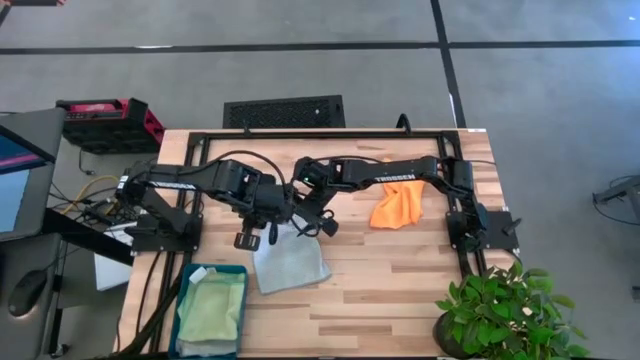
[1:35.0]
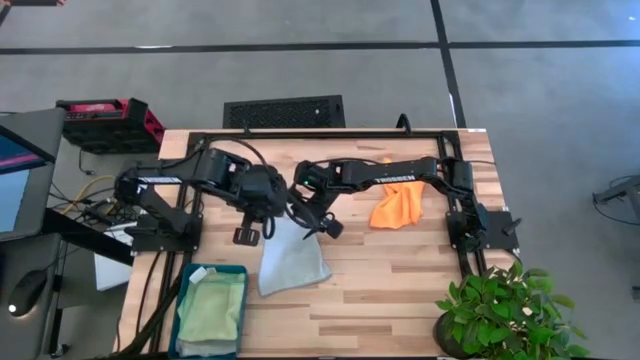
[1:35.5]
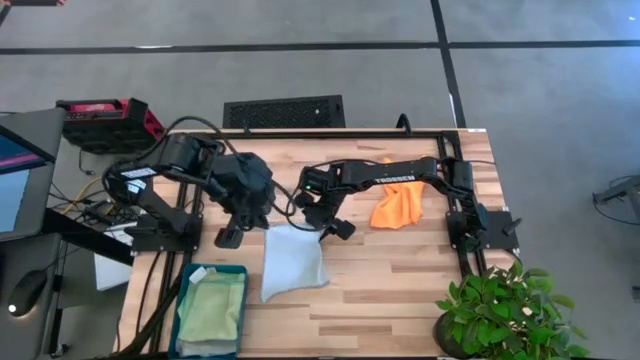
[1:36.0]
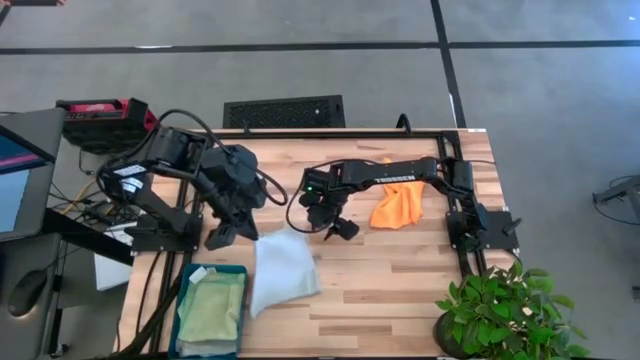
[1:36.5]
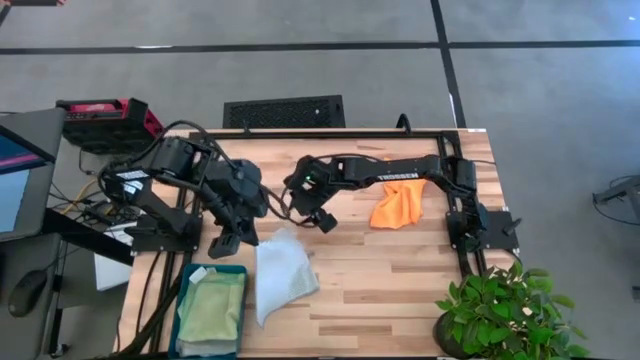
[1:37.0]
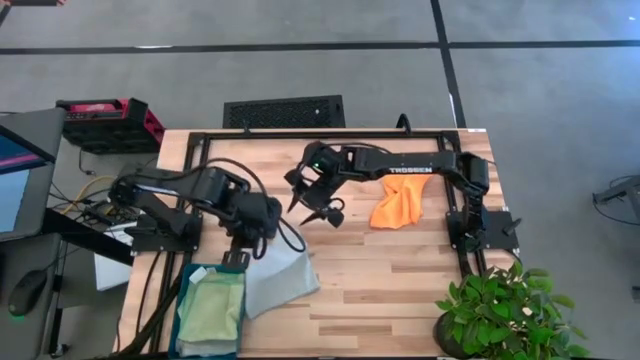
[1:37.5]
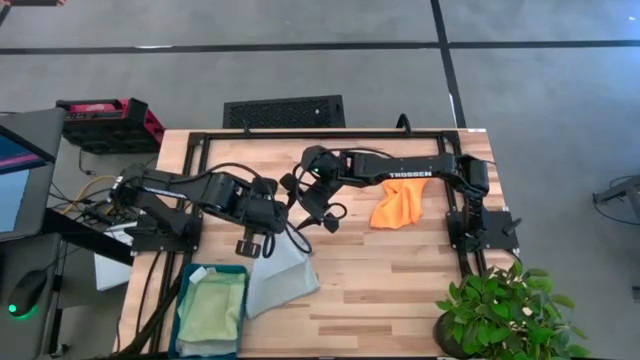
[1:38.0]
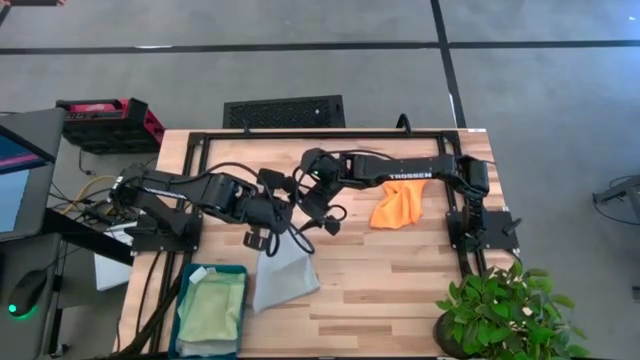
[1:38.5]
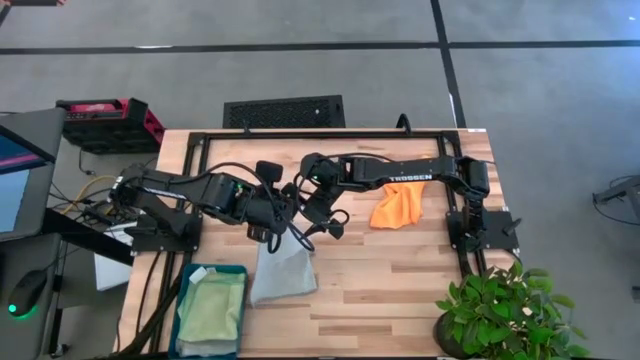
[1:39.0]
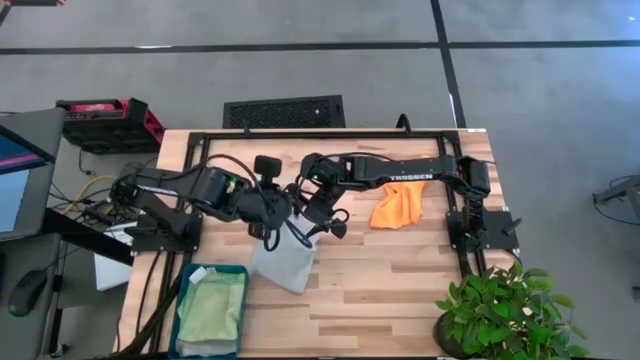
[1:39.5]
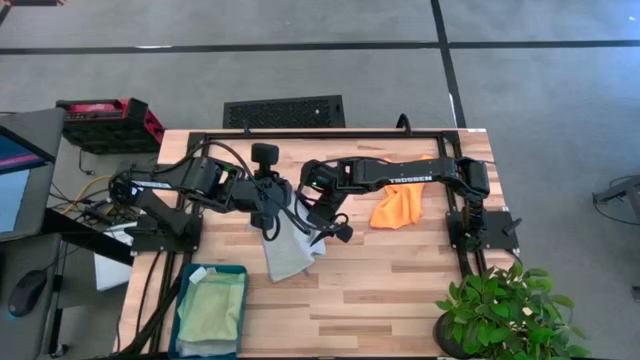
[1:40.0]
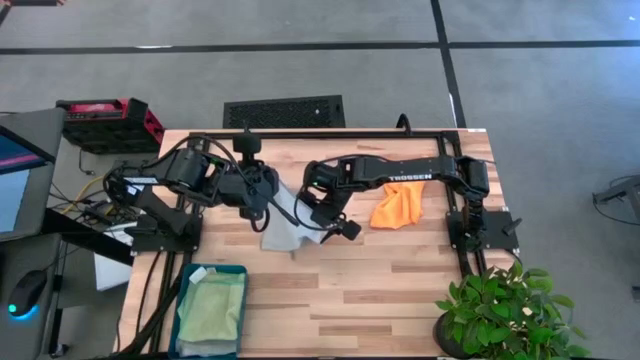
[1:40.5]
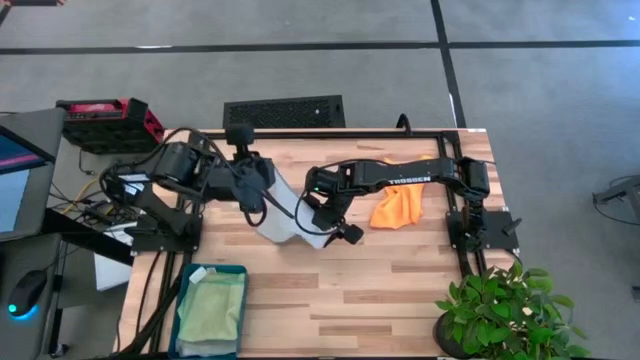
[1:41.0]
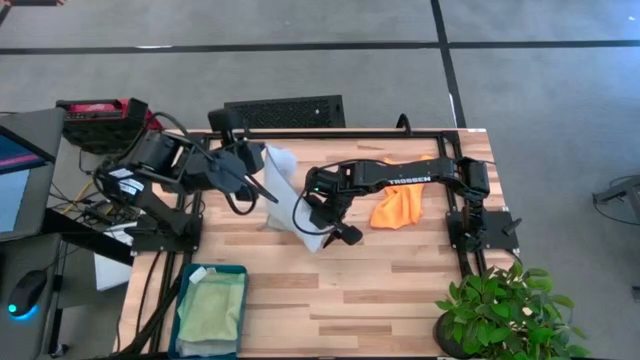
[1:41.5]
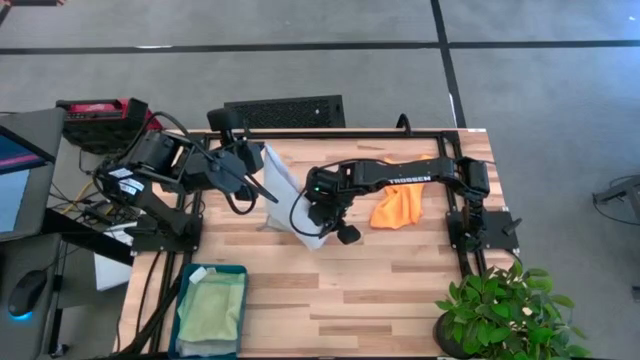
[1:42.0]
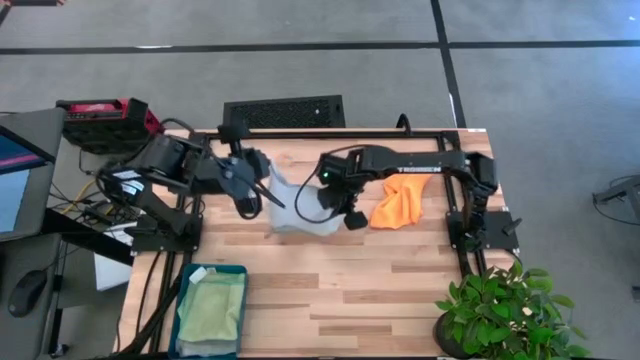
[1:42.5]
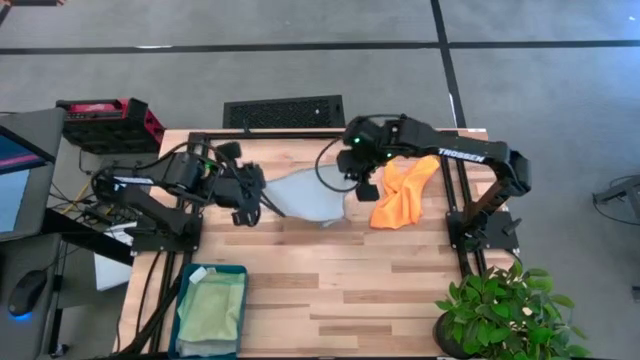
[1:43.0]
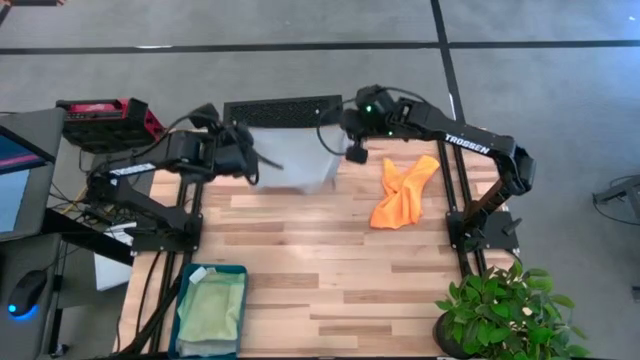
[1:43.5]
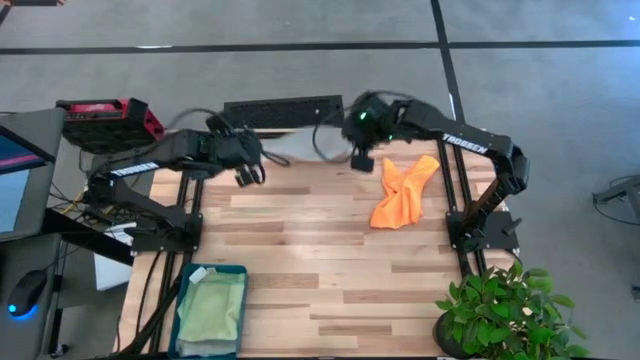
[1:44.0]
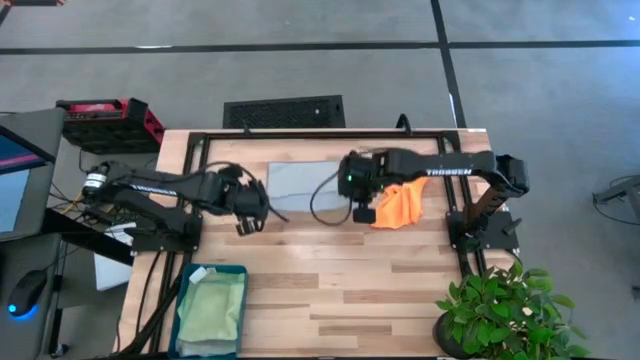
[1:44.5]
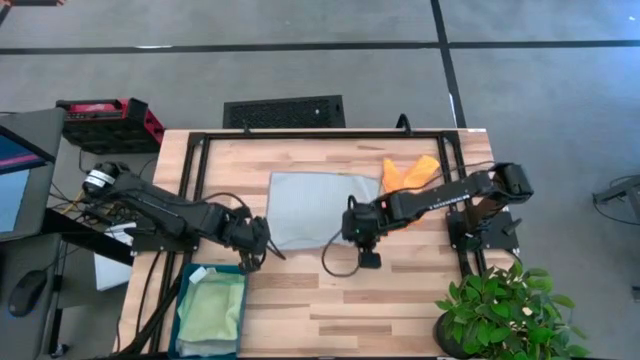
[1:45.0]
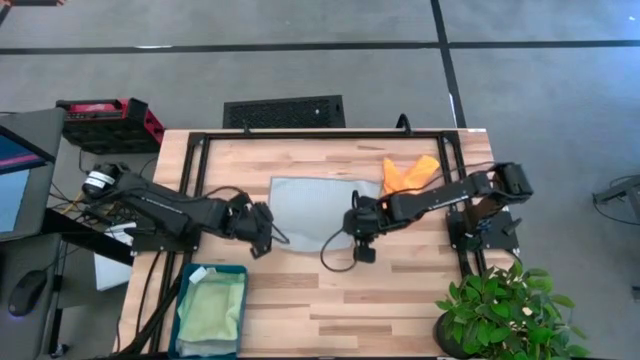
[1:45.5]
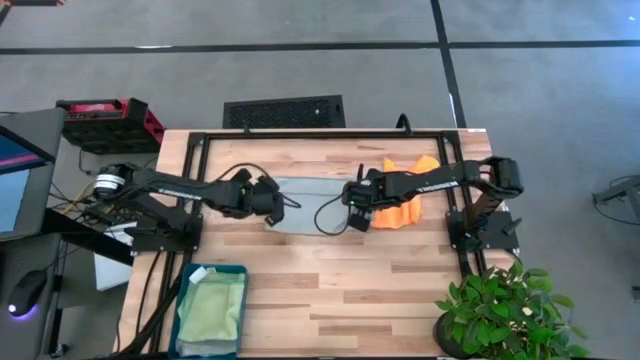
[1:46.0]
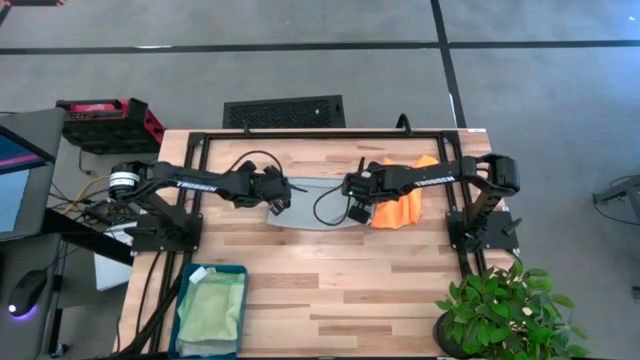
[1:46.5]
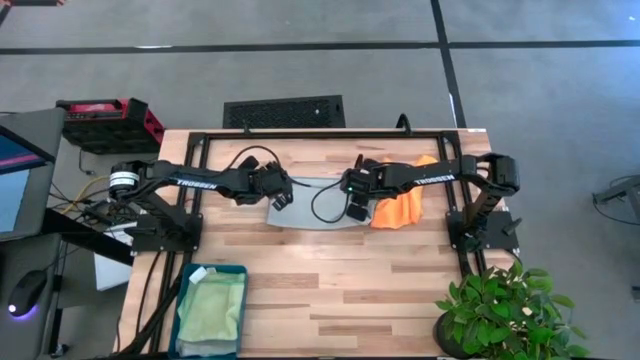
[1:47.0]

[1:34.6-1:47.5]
Task: Fold microfiber towels
Fold the gray microfiber towel

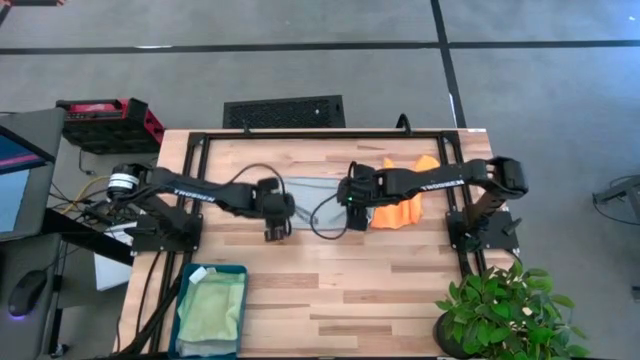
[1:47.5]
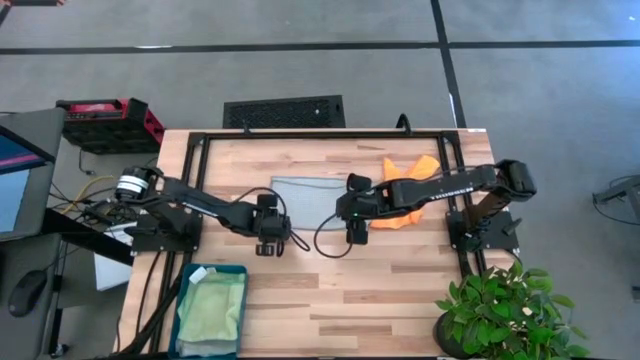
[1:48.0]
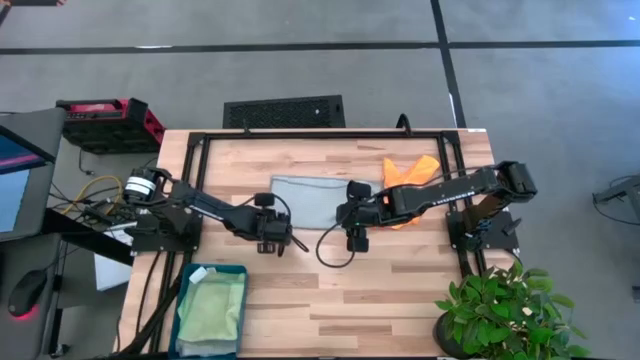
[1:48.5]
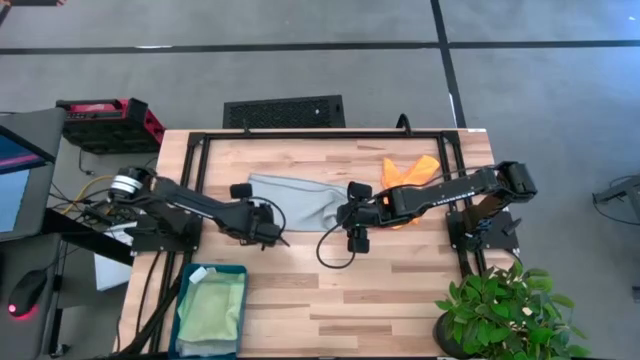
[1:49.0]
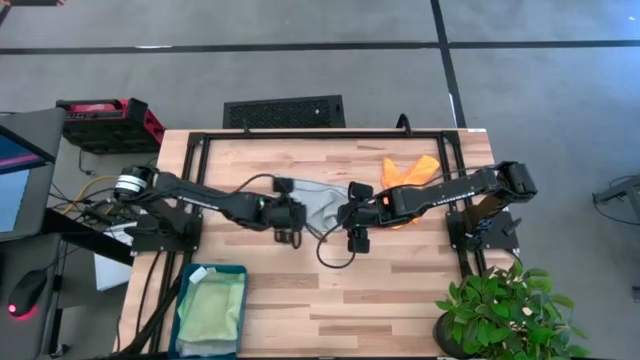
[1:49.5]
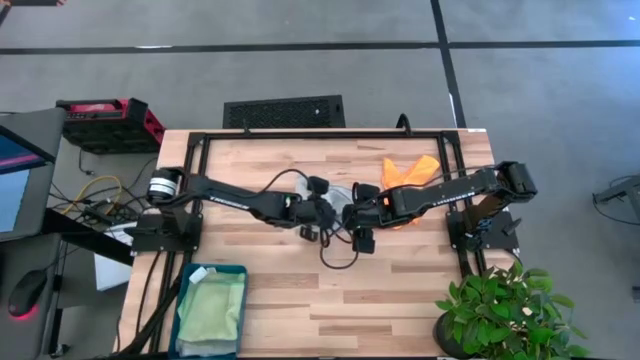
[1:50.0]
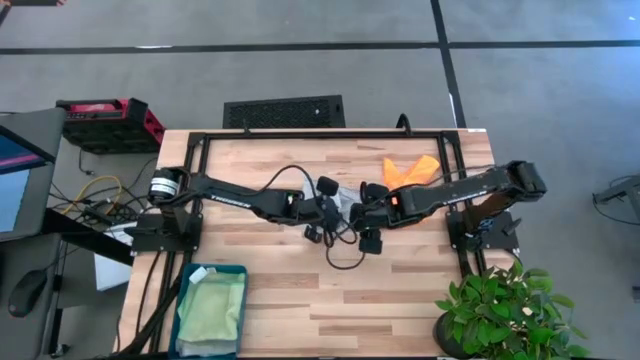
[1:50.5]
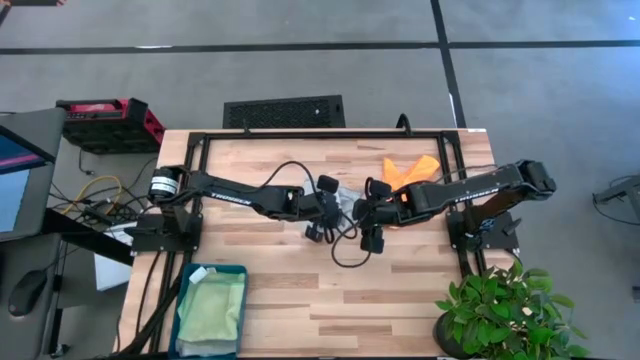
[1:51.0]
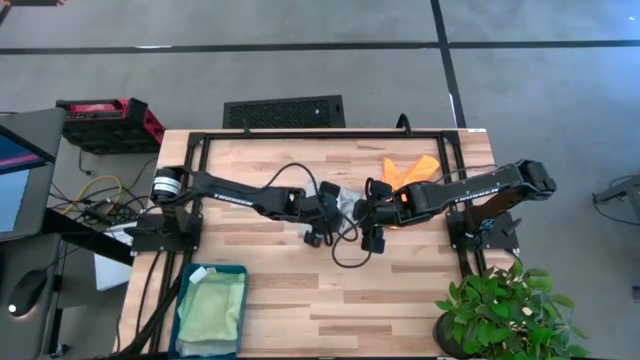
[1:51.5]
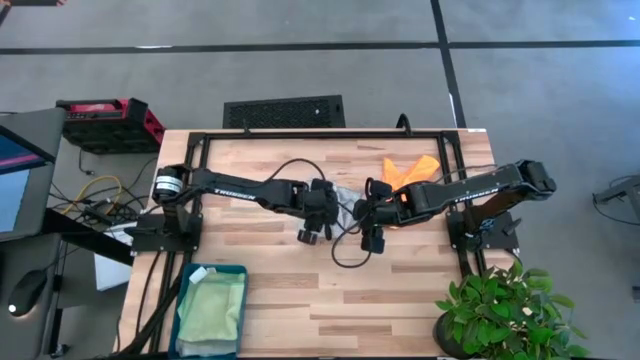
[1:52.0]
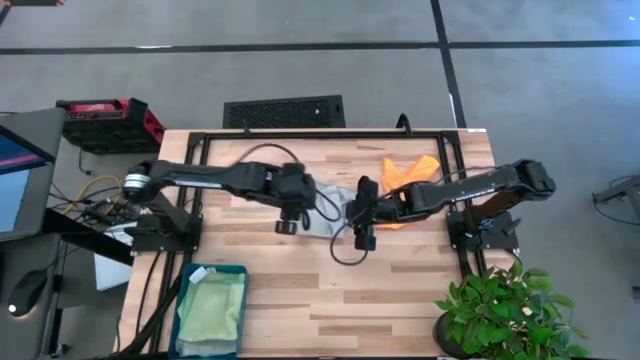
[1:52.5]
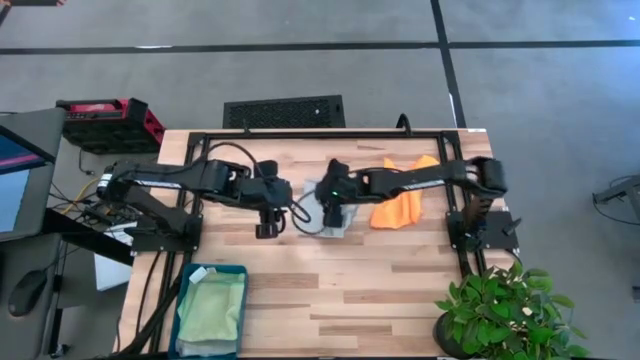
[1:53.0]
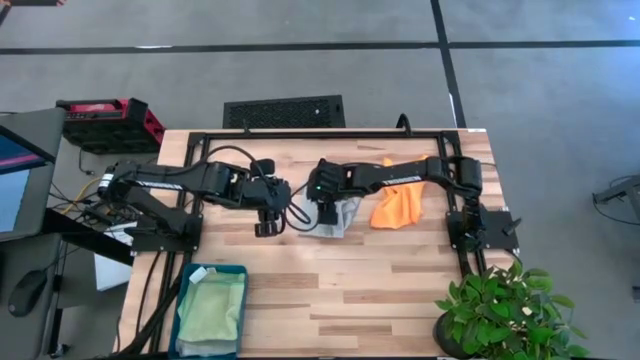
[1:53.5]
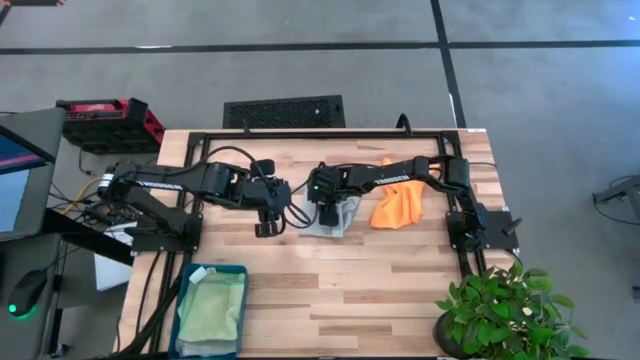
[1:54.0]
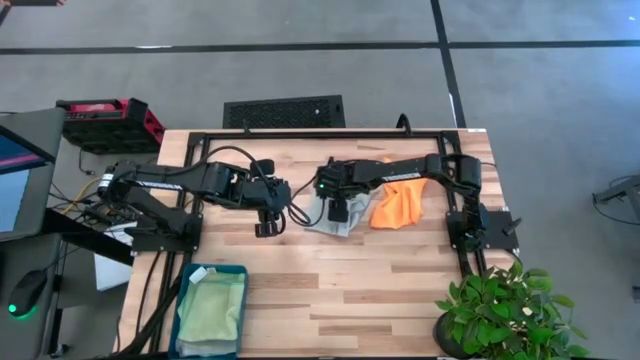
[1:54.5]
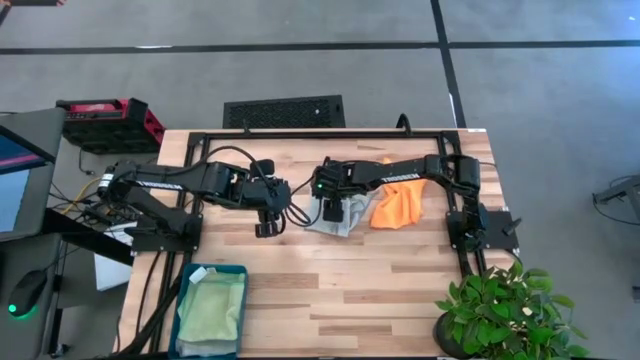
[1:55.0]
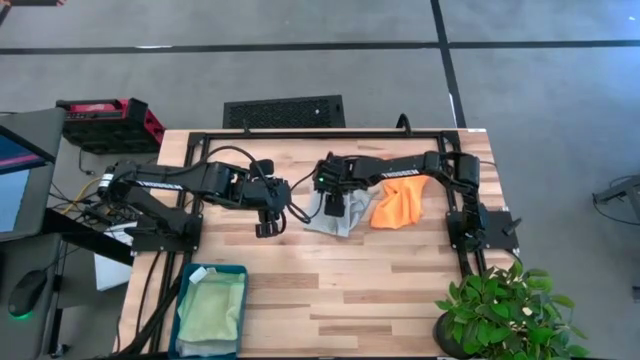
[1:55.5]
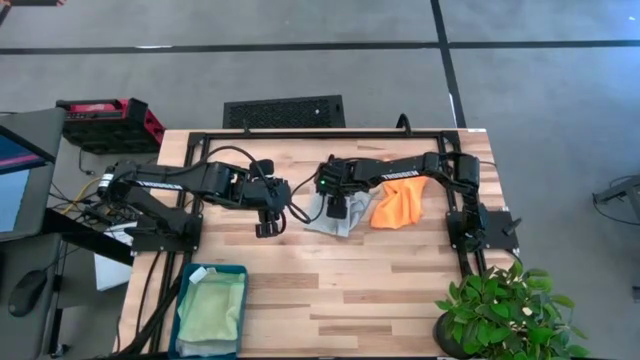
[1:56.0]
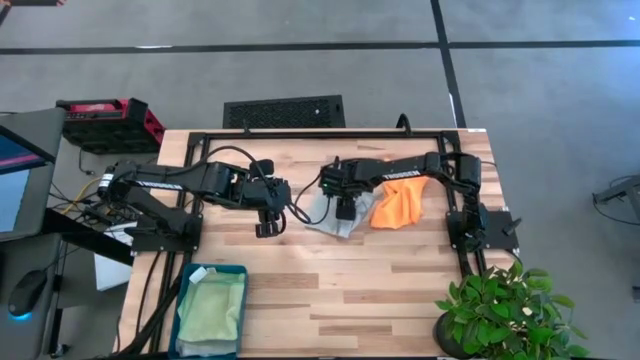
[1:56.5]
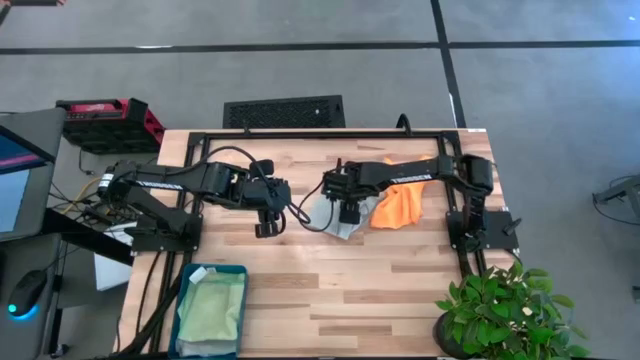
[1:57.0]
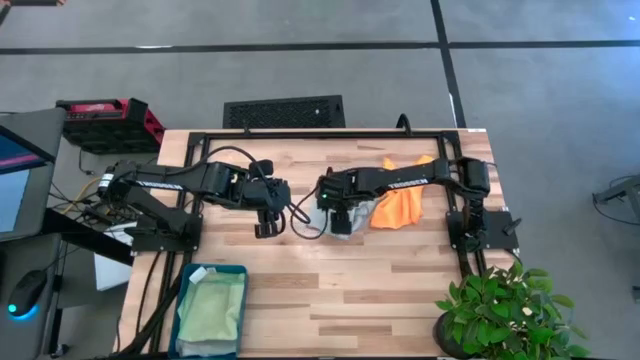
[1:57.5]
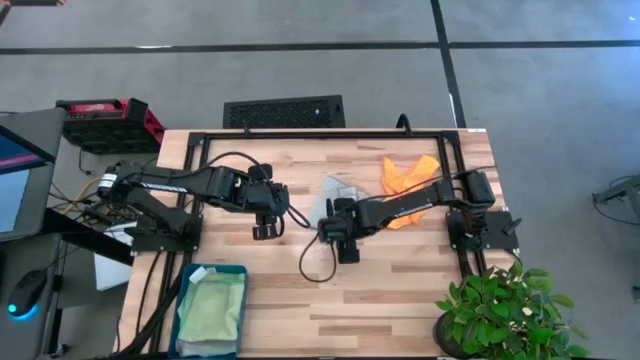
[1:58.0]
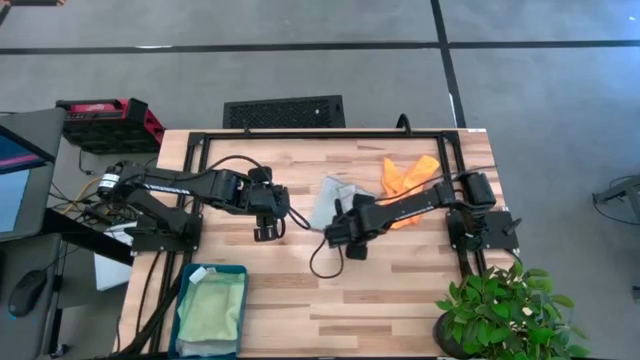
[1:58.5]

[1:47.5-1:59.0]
Fold the gray microfiber towel
